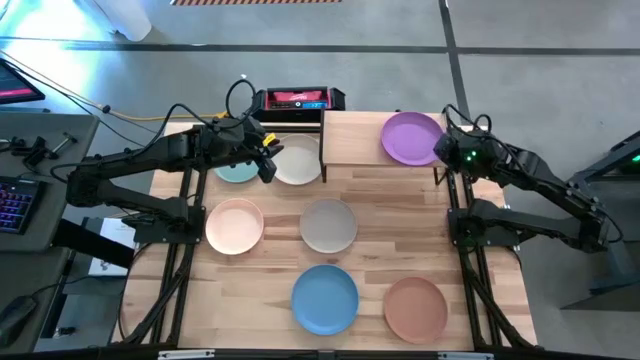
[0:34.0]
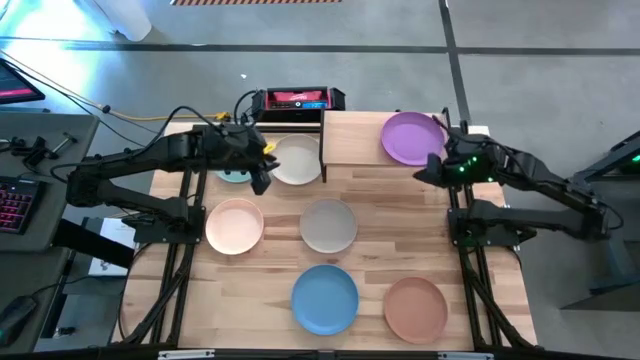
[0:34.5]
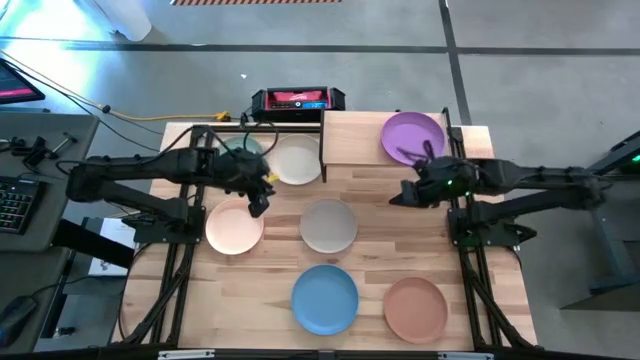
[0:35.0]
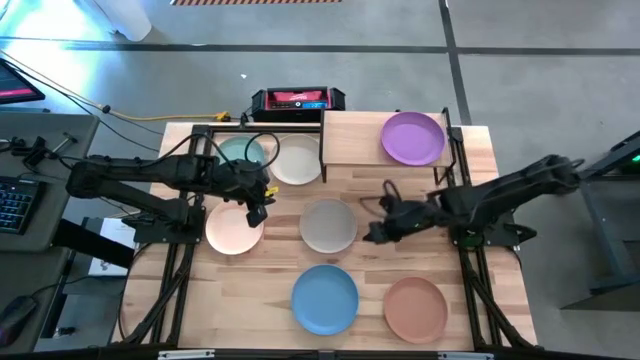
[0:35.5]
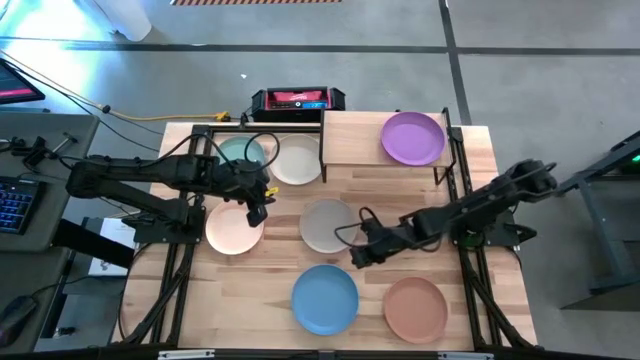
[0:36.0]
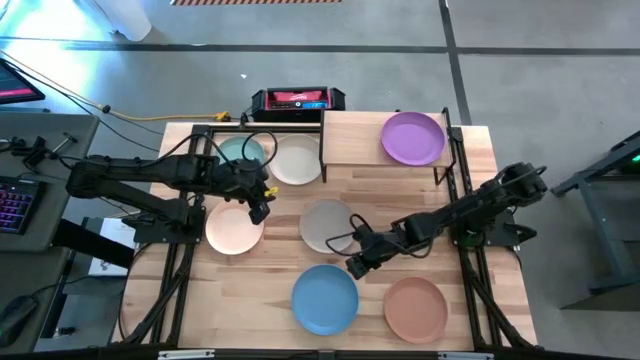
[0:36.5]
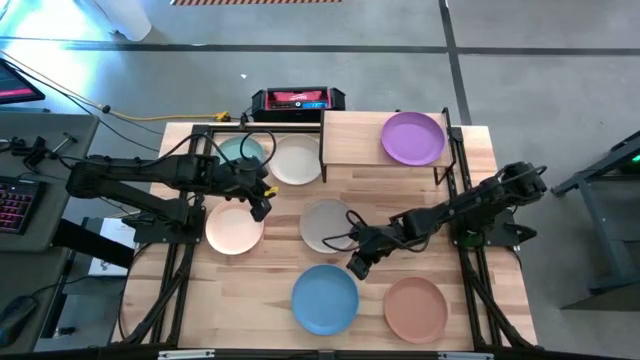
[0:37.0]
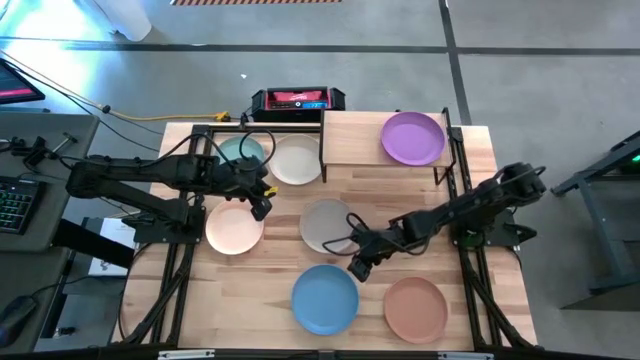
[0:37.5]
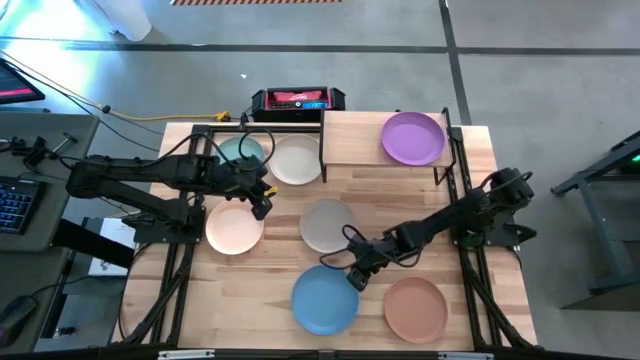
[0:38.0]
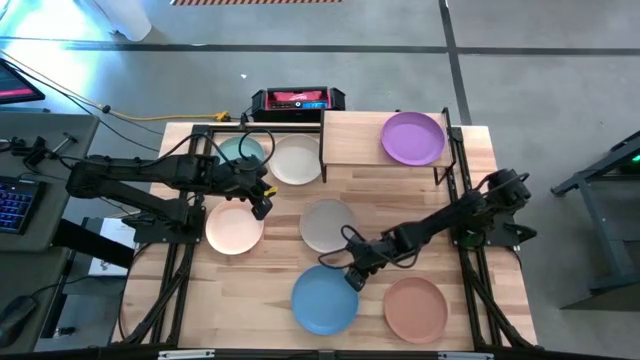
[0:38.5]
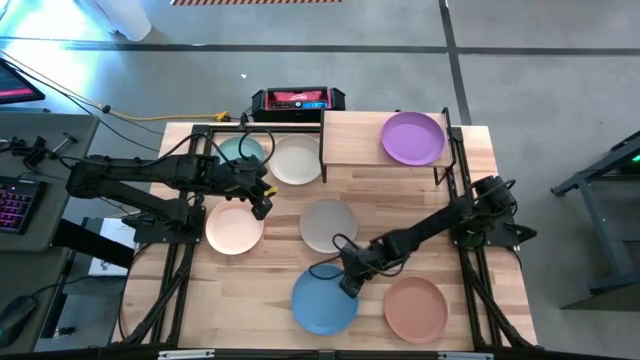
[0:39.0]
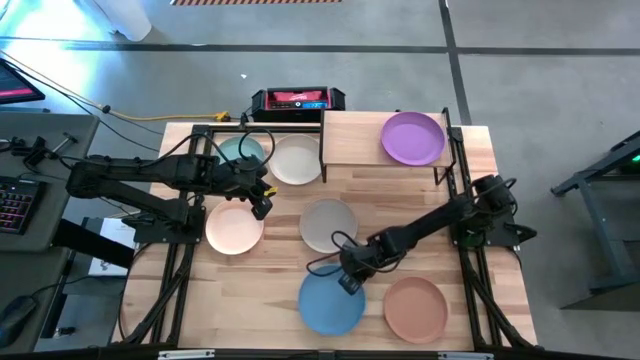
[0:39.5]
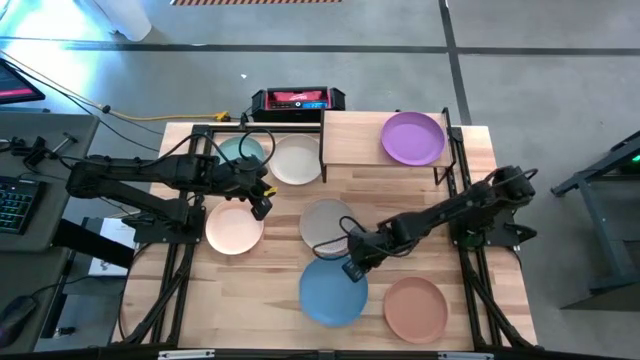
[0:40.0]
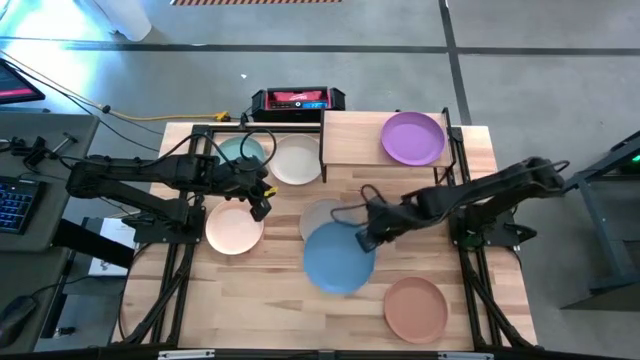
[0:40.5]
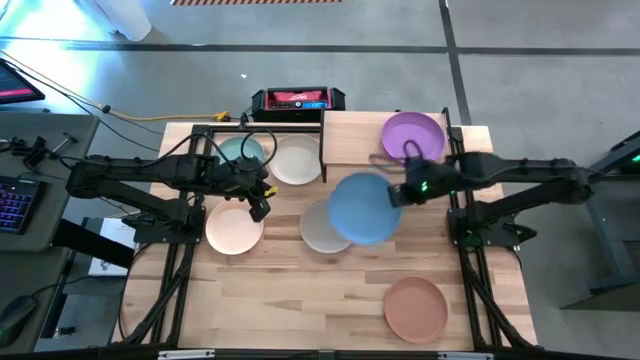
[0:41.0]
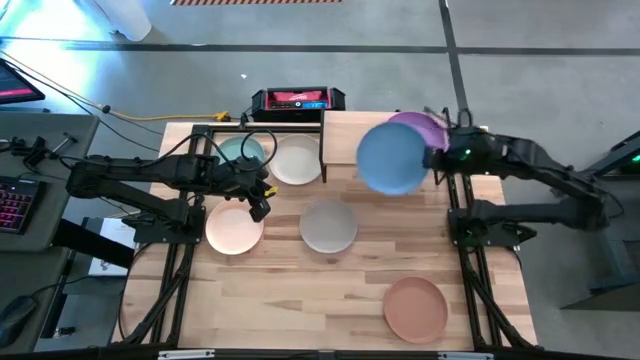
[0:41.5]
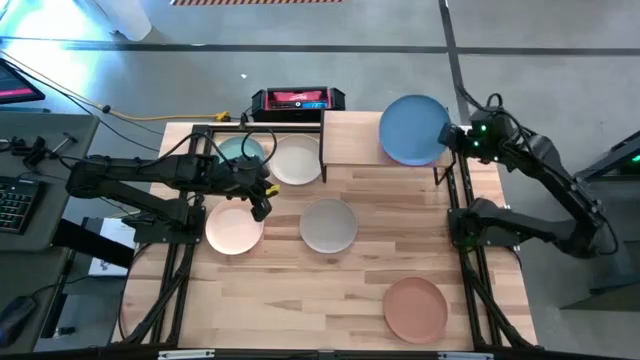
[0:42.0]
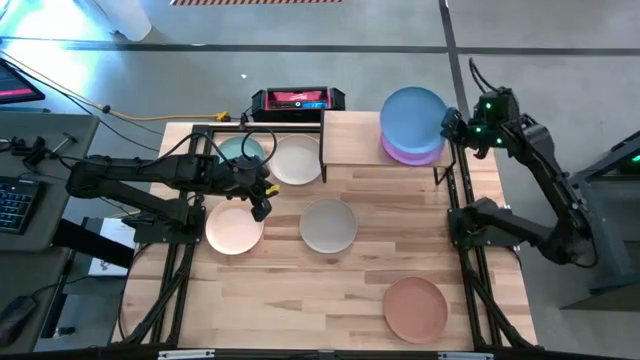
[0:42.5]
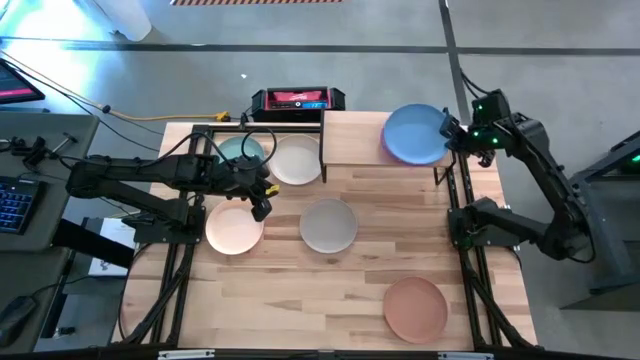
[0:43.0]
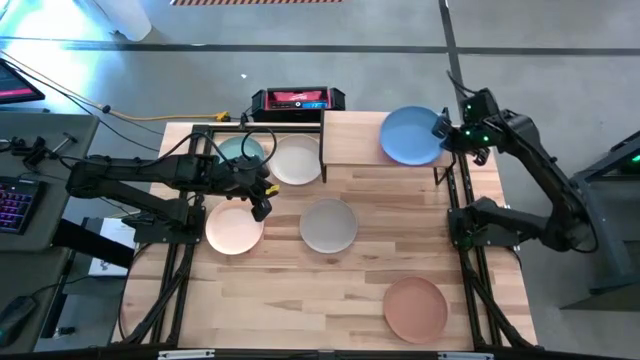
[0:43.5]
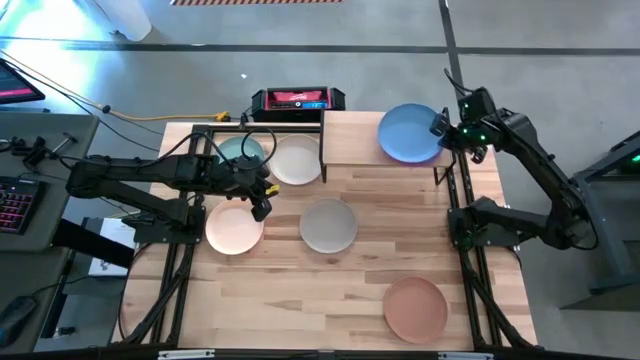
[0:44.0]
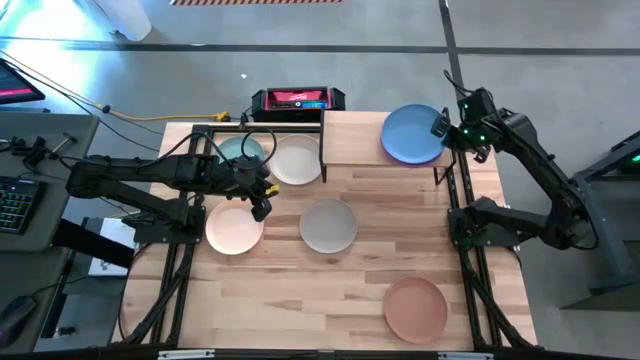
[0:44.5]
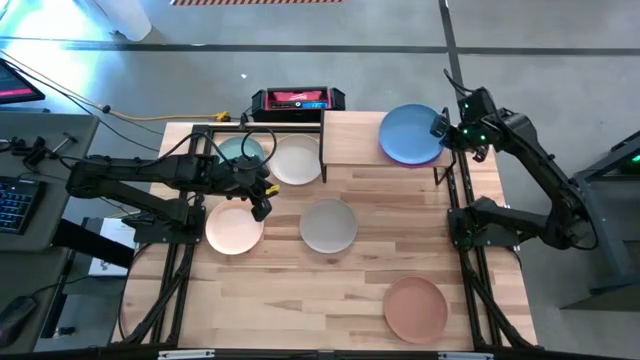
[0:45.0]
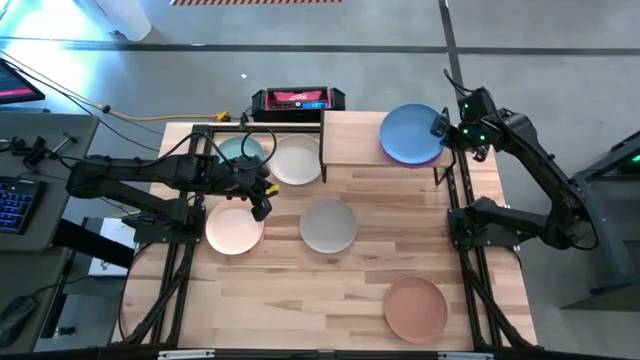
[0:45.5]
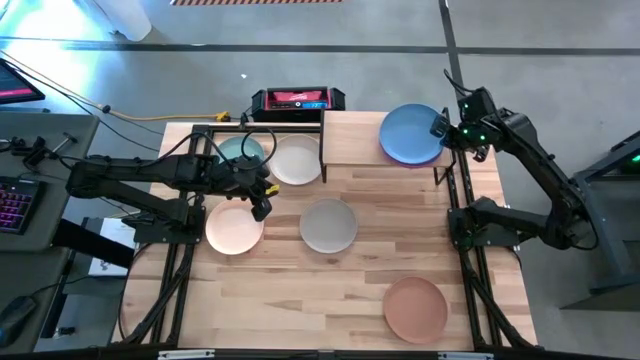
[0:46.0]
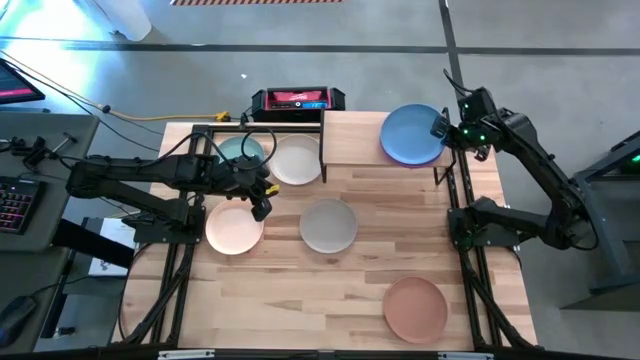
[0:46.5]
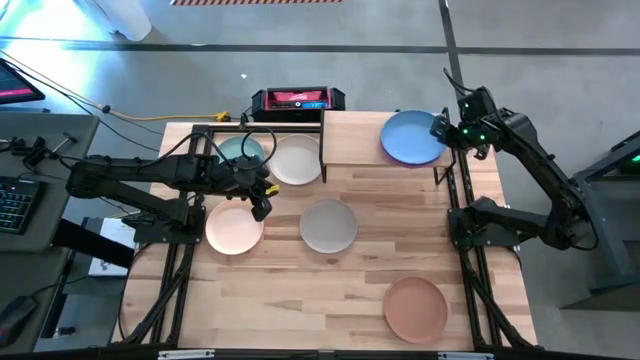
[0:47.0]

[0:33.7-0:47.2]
Task: Place and stack plates onto a shelf
Stack the blue plate on top of the purple plate on the shelf

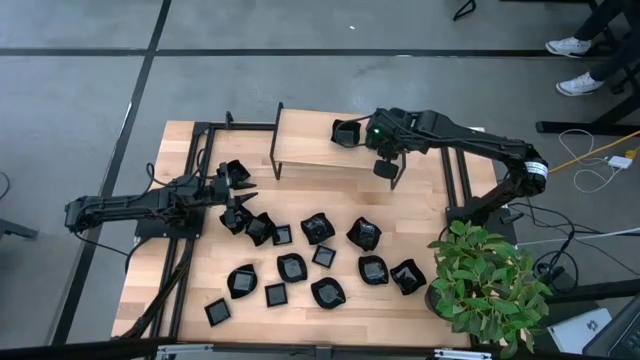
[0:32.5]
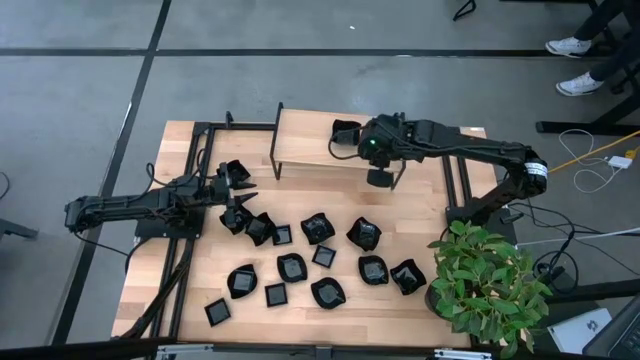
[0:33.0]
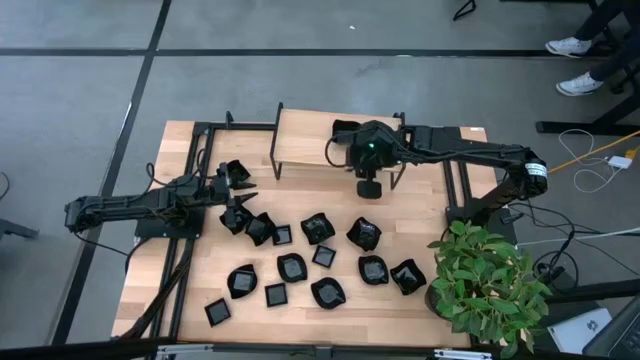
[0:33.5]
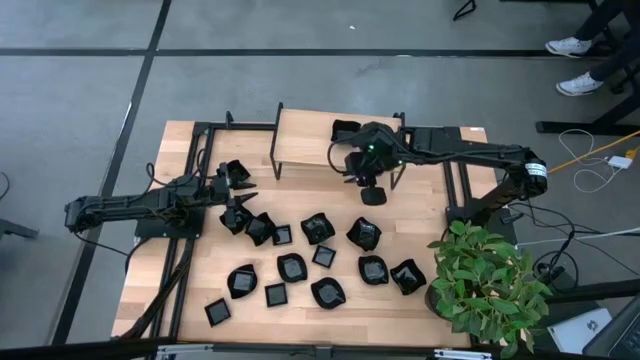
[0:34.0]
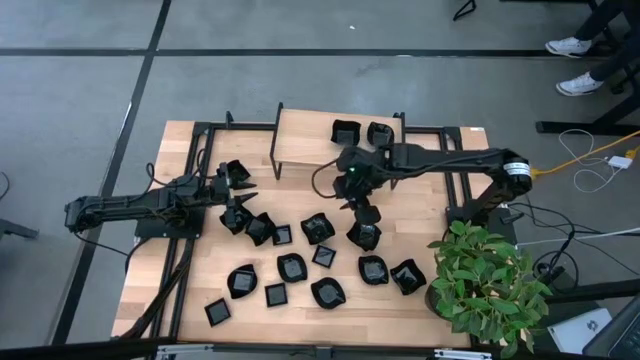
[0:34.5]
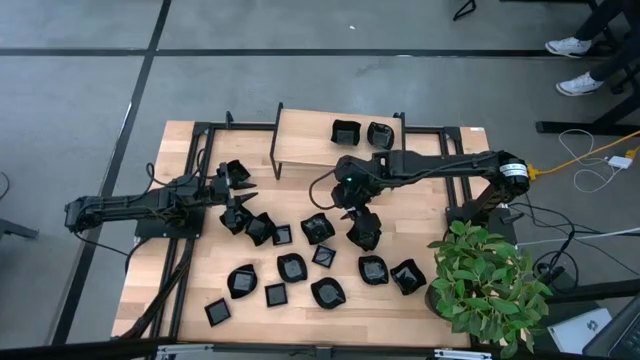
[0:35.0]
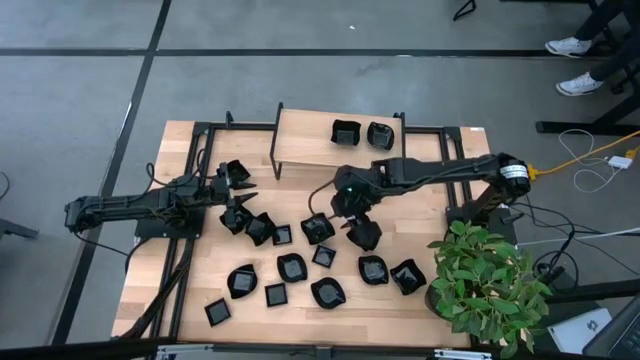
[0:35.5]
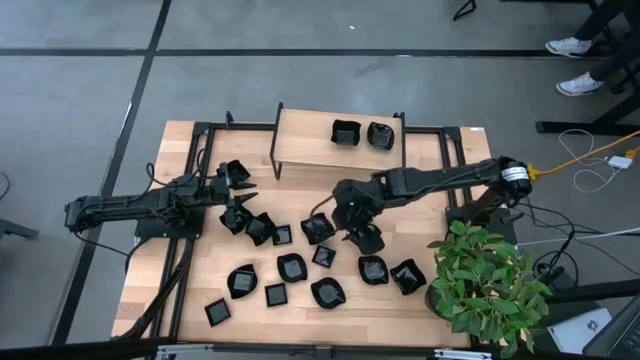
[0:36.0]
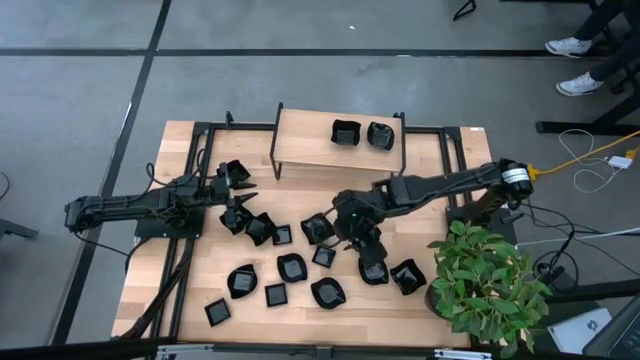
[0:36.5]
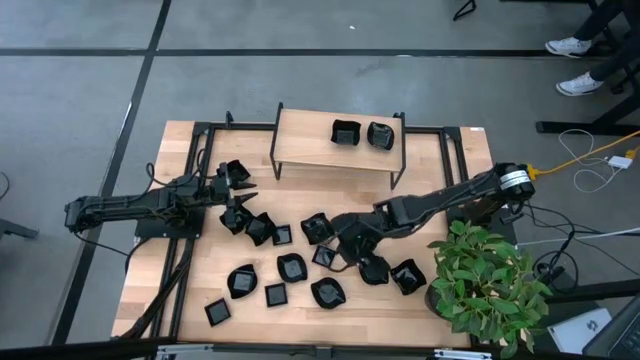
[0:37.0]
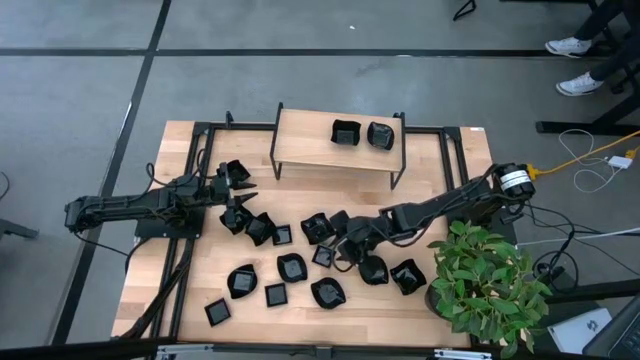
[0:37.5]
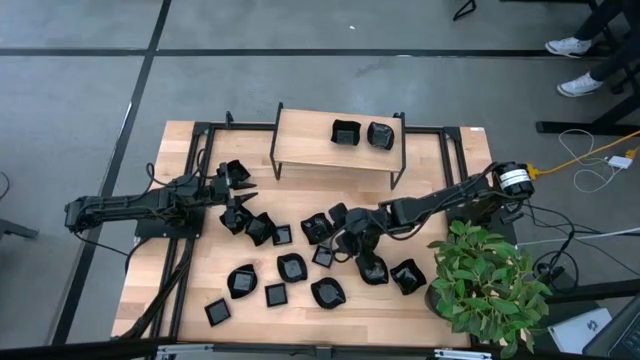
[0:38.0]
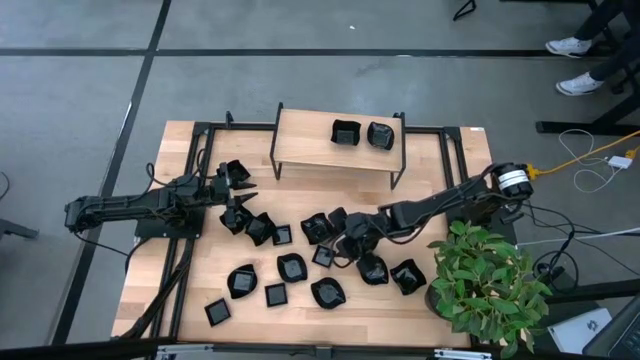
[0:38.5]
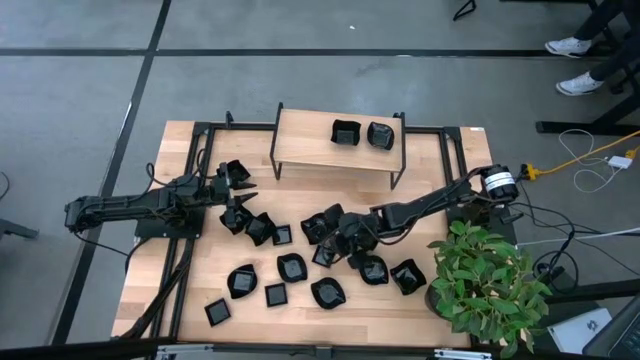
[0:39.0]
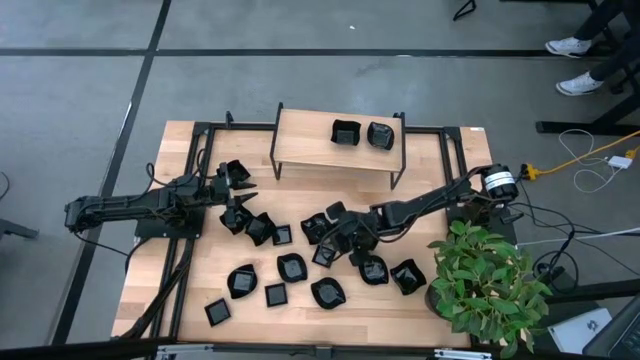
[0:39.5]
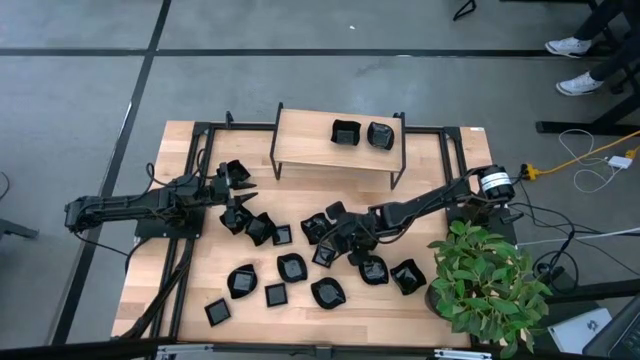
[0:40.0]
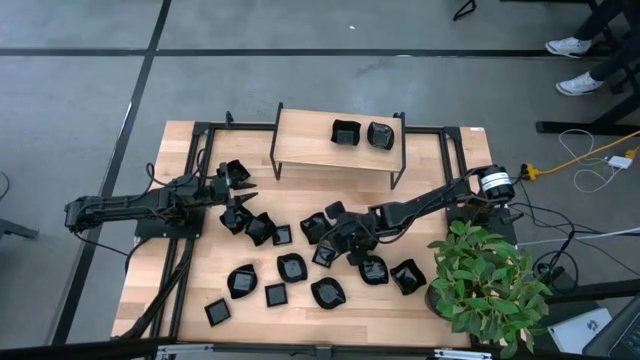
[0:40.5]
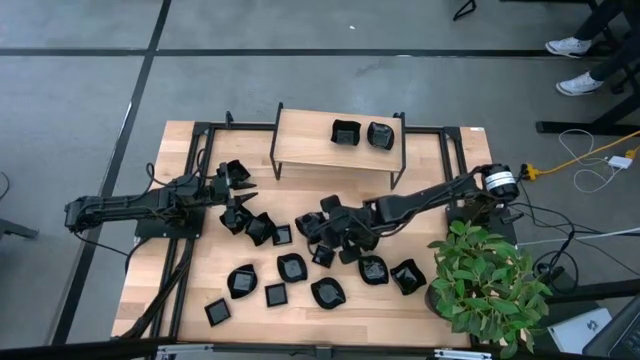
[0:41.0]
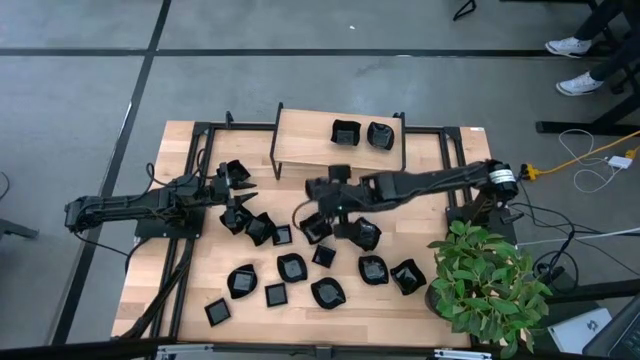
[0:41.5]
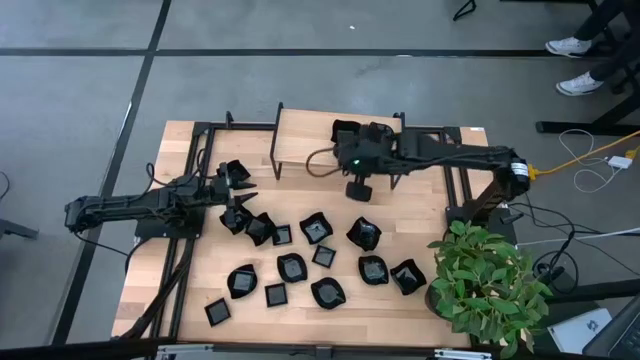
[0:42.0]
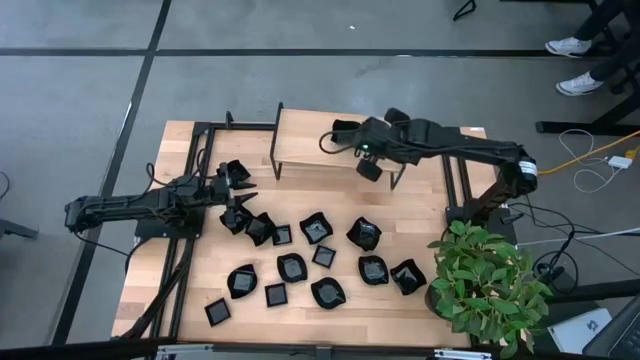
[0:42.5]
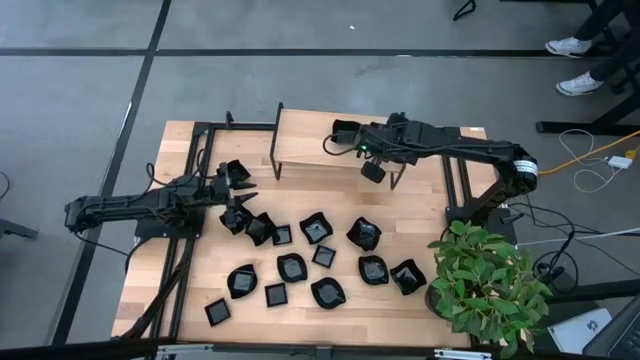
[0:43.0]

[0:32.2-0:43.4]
Task: Pick & Place Mini shaped plates
Stack the leaf-shaped plate on top of the leaf-shaped plate on the shelf
